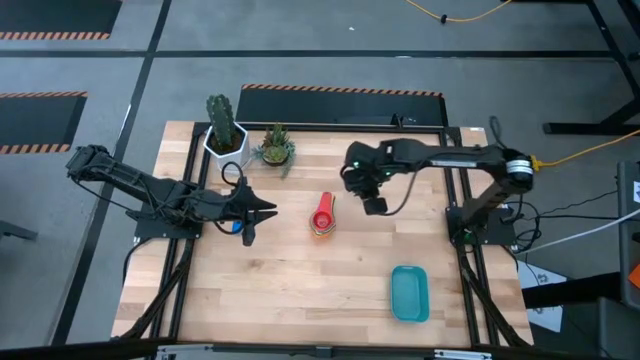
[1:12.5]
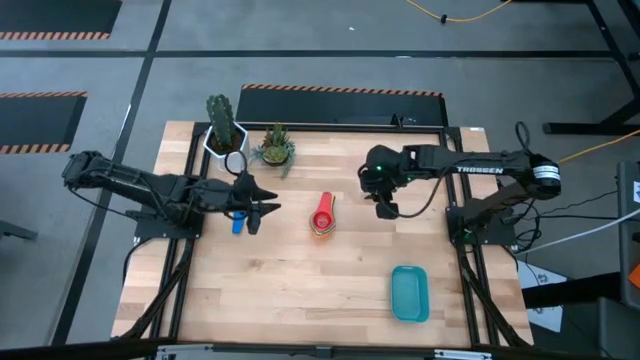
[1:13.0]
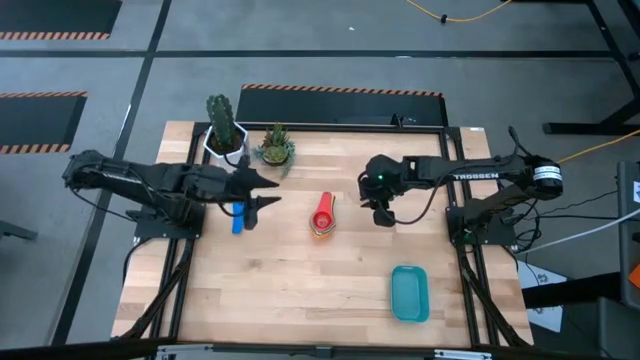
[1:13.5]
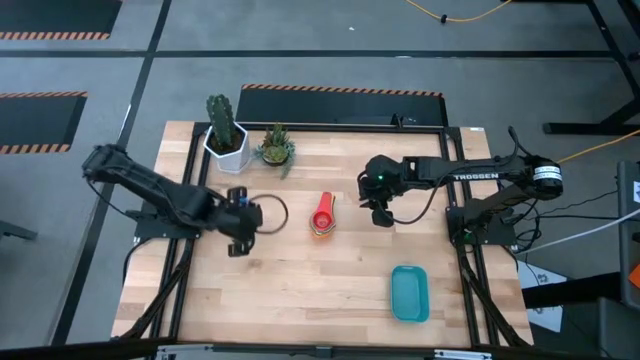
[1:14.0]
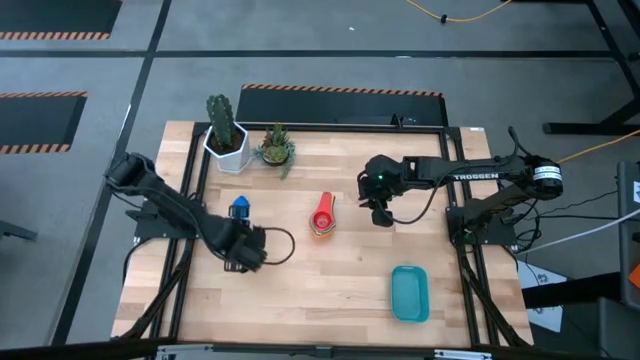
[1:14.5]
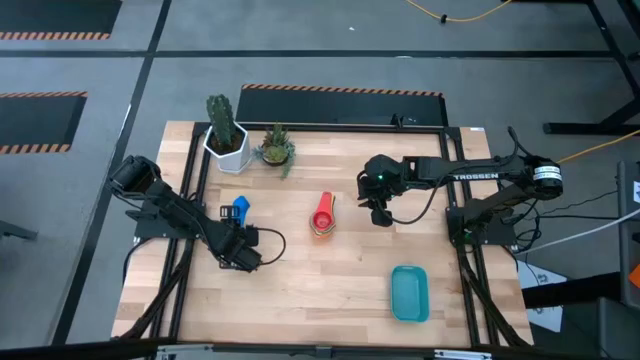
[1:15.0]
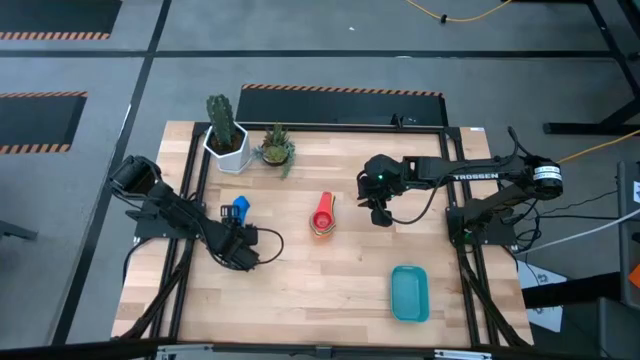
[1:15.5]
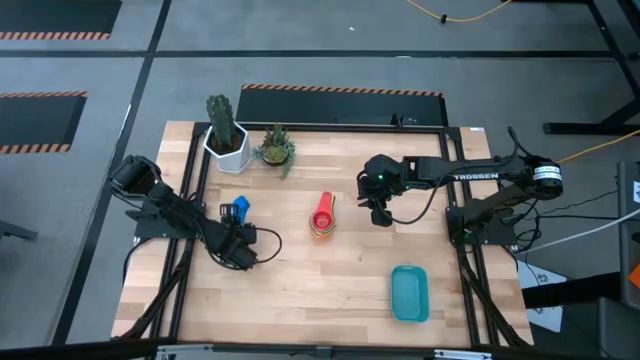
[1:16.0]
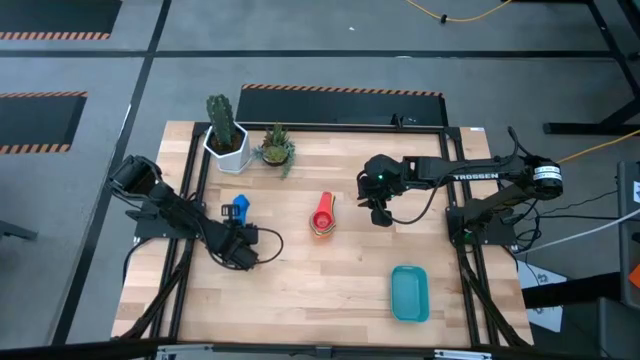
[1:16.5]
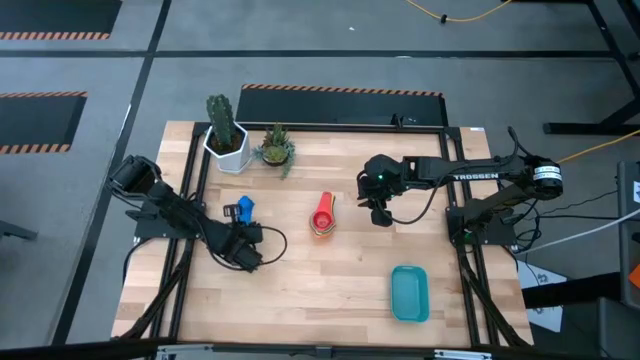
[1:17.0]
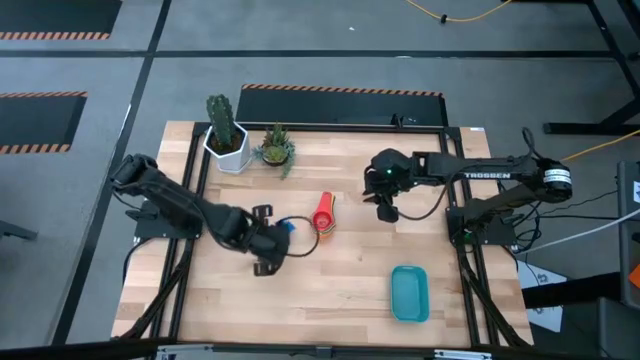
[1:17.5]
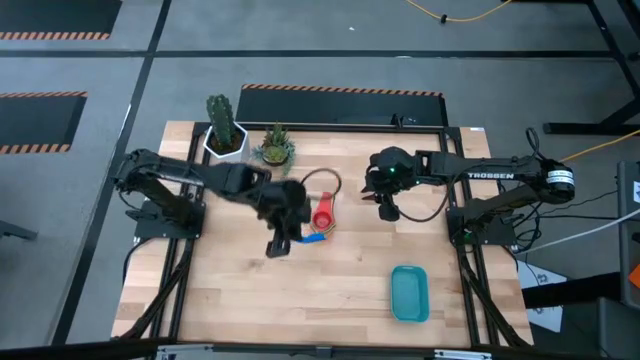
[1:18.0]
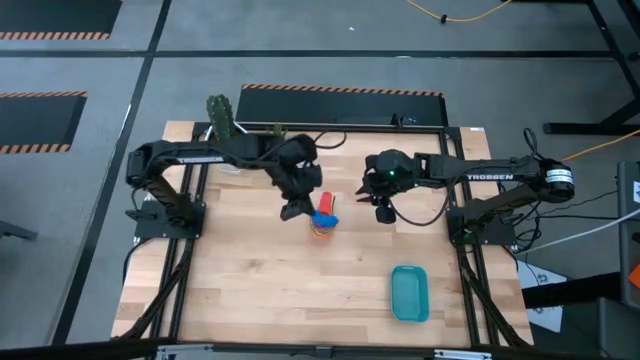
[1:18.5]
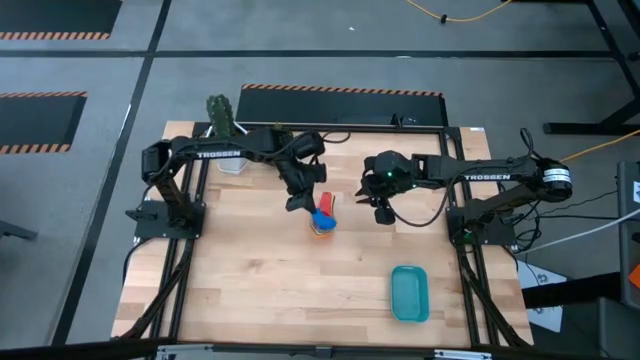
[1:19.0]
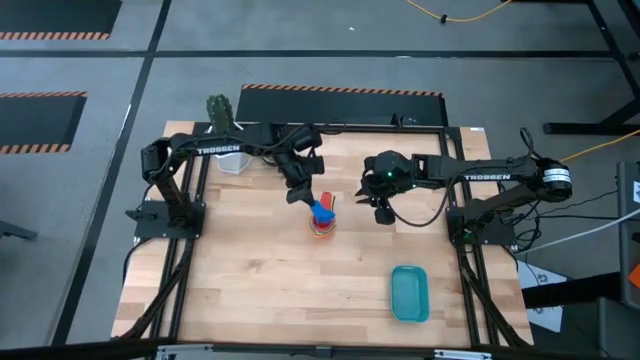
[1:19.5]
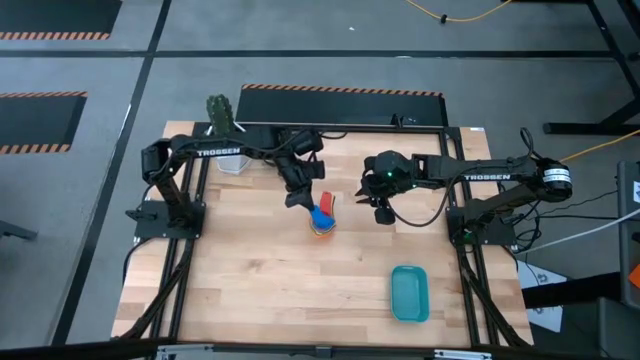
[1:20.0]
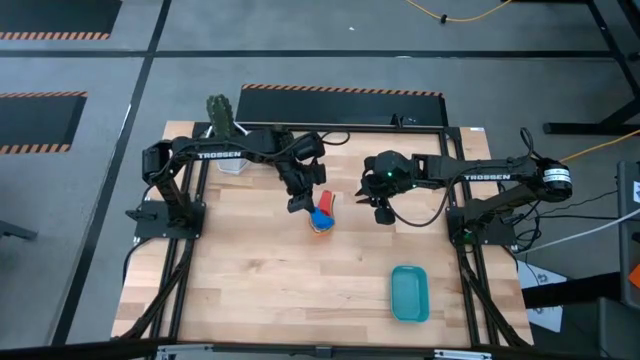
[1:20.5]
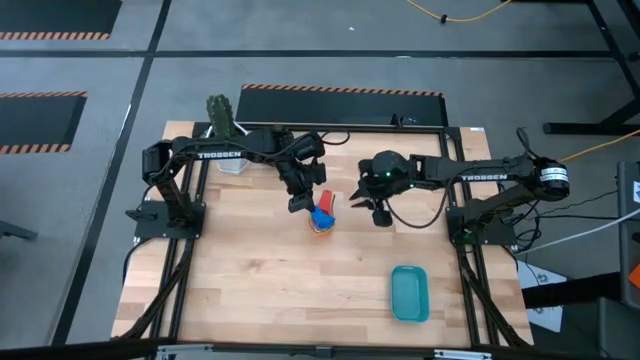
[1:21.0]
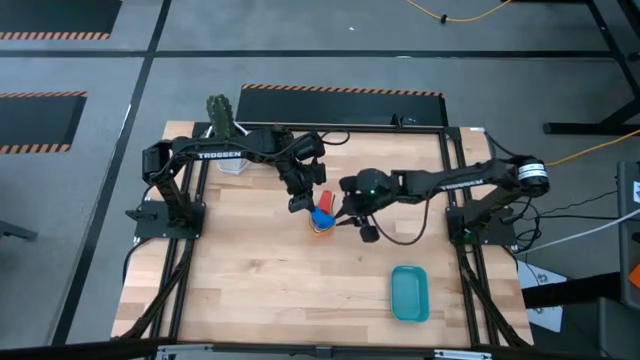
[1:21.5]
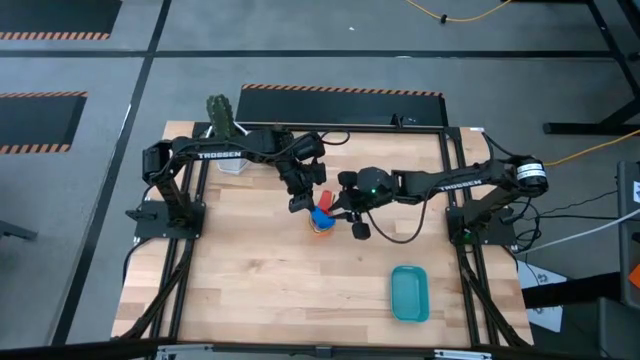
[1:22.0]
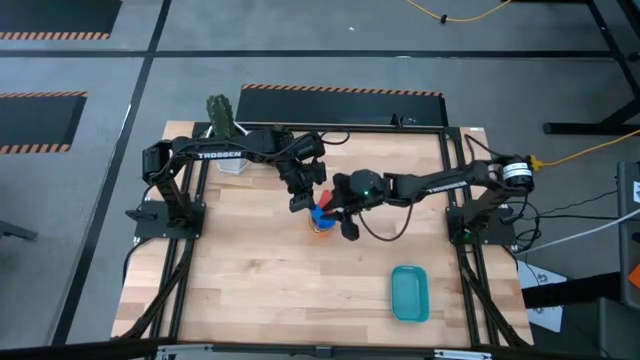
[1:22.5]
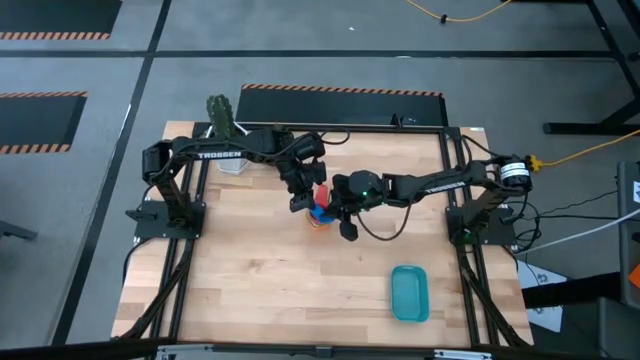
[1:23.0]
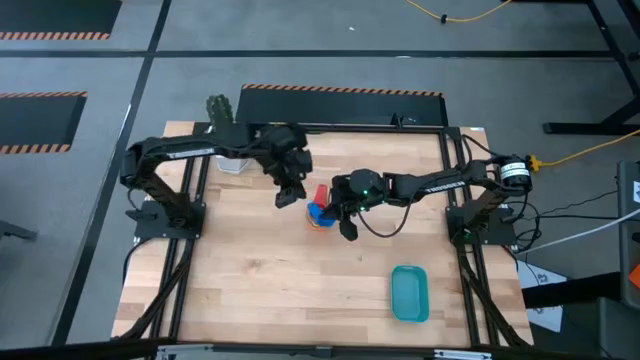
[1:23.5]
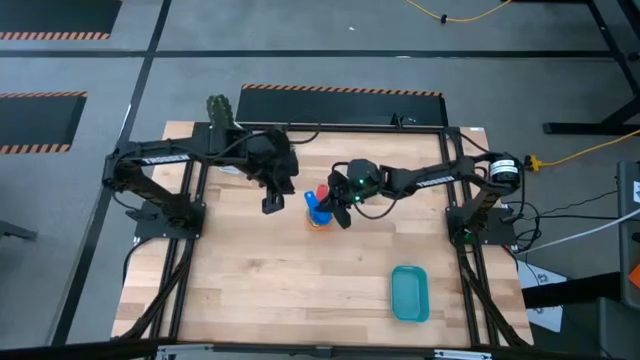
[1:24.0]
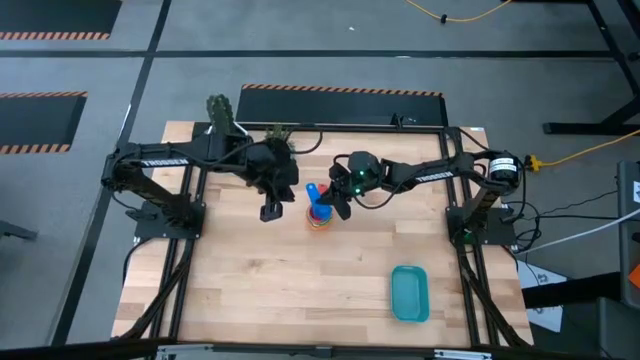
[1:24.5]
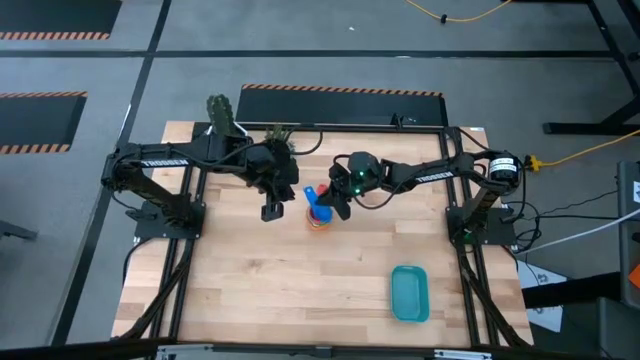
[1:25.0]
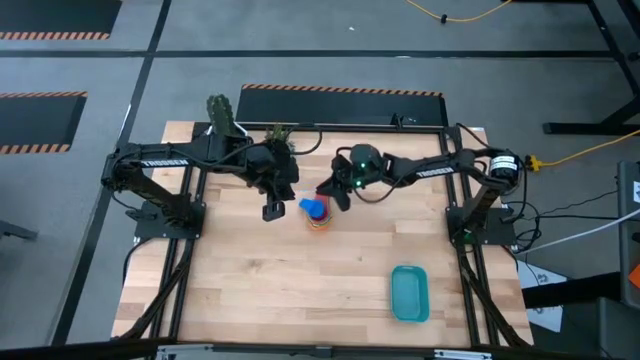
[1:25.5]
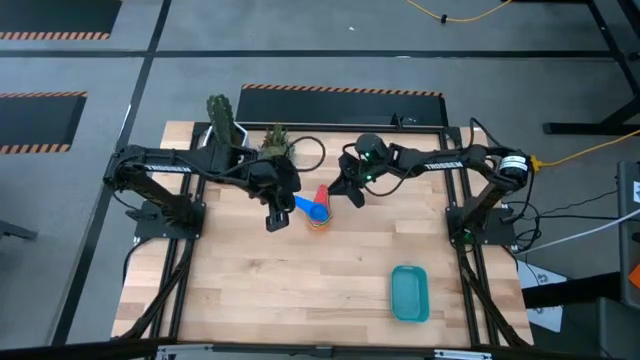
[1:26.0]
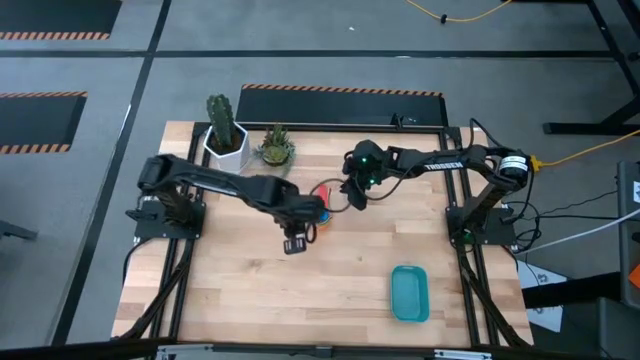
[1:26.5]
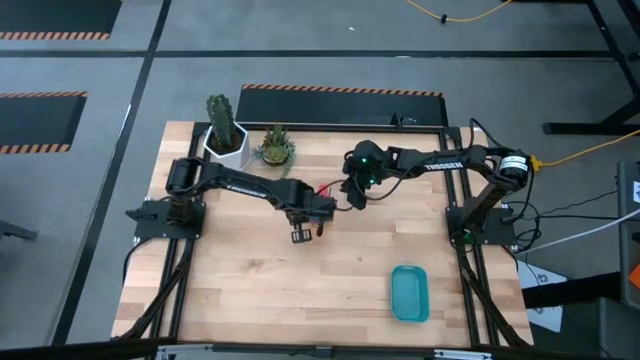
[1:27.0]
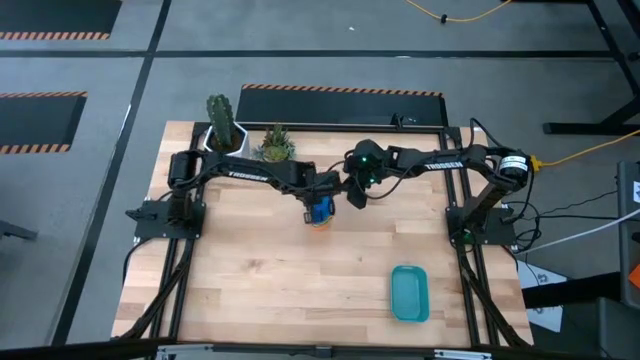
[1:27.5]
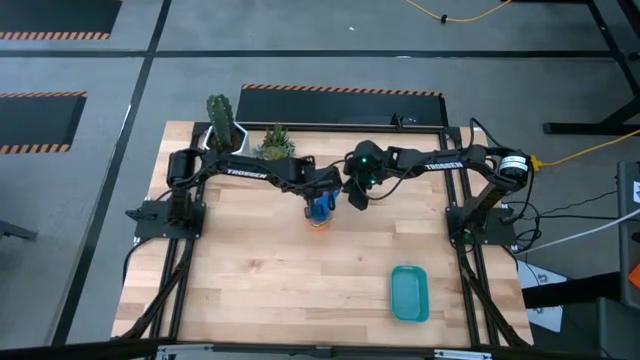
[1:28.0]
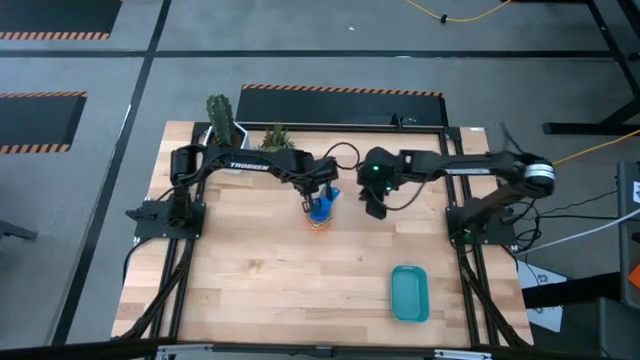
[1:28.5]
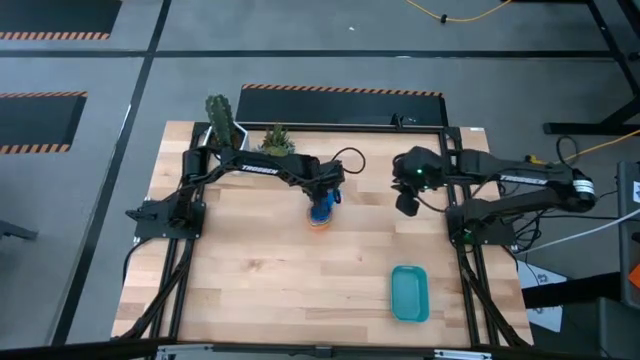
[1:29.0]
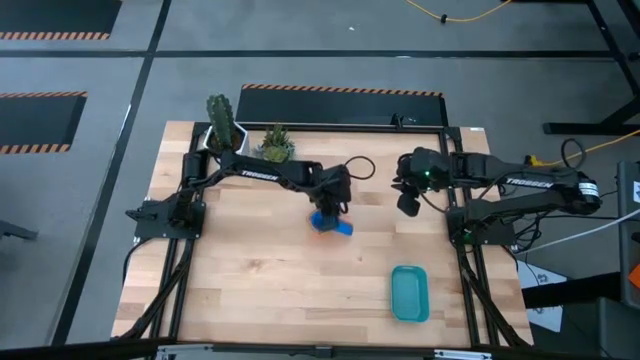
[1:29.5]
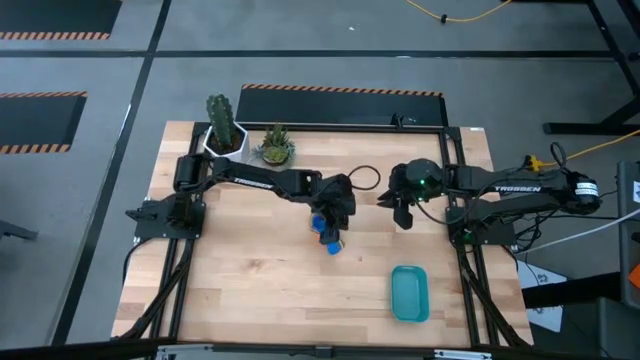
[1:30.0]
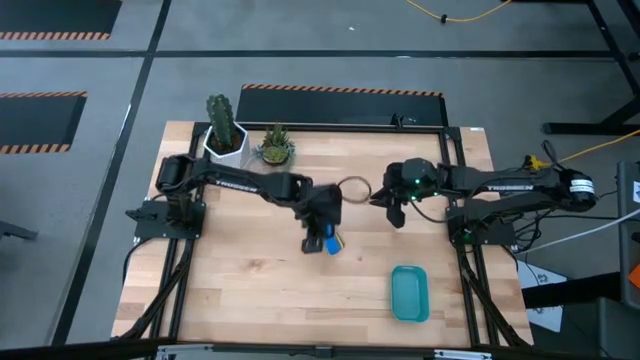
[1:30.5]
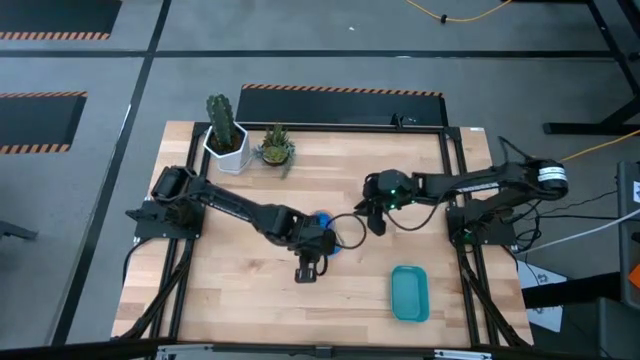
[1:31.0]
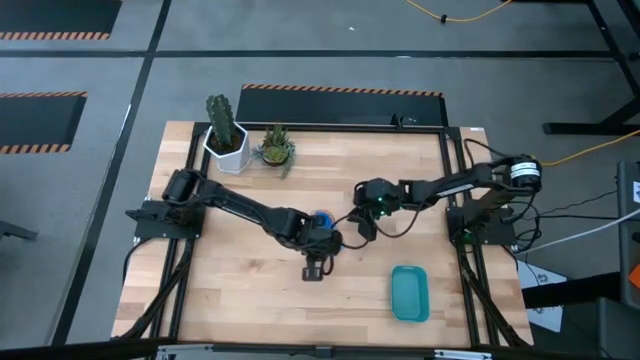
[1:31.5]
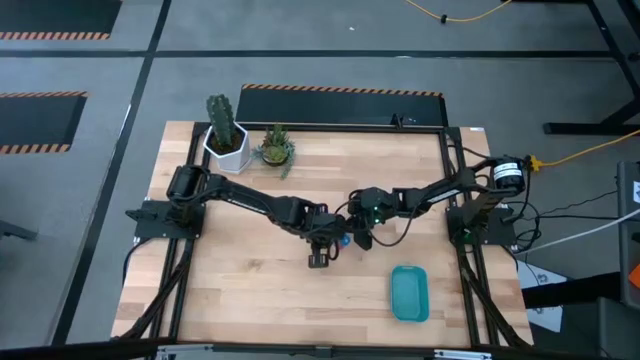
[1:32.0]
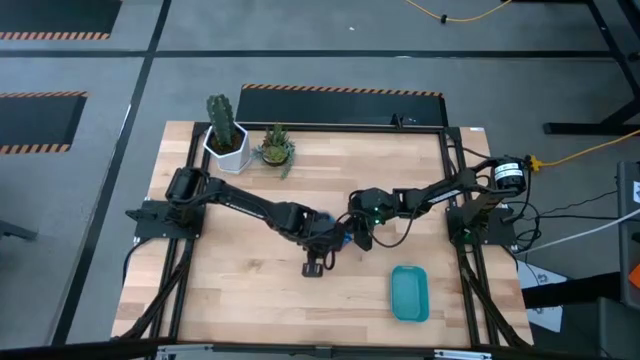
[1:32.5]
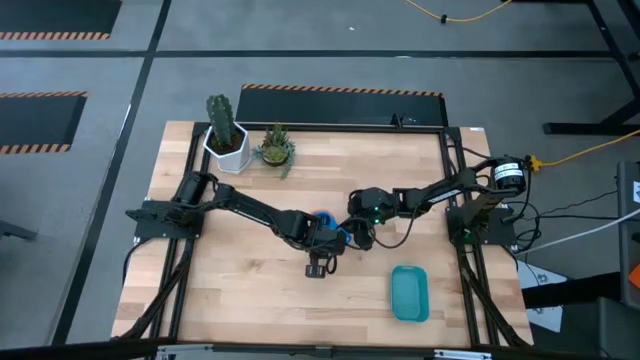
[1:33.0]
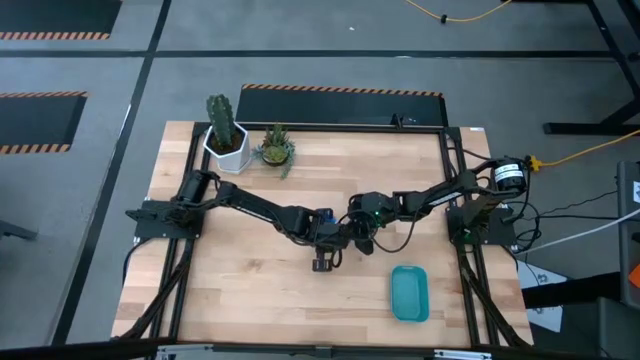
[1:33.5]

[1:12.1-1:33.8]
Task: Nest measuring cups in basket
Stack the blue measuring cup on top of the red measuring cup
